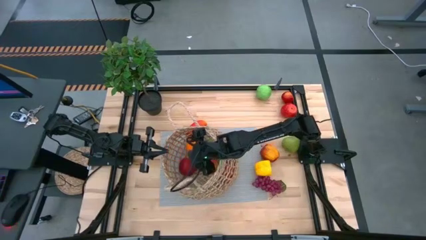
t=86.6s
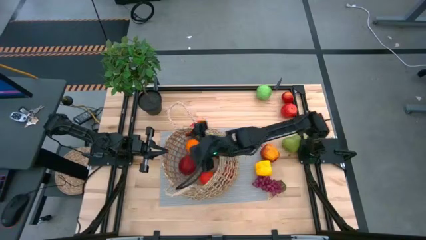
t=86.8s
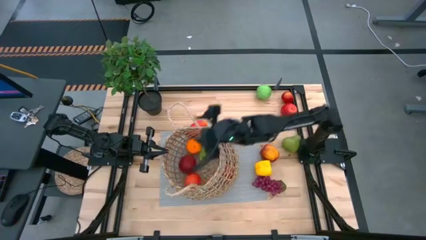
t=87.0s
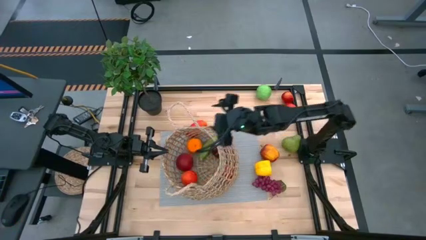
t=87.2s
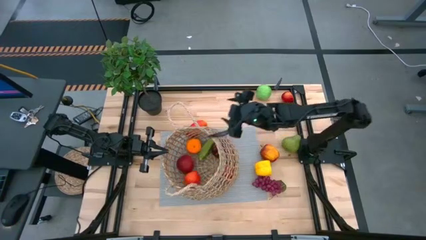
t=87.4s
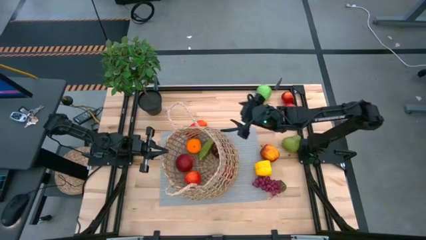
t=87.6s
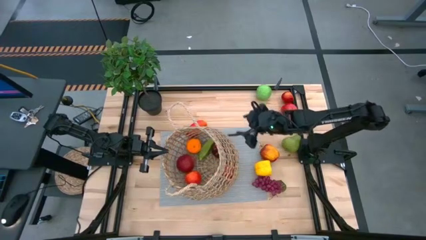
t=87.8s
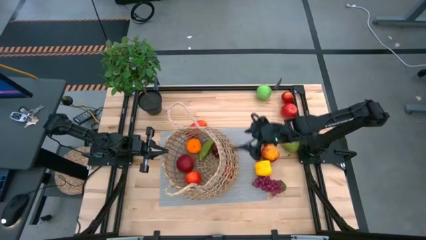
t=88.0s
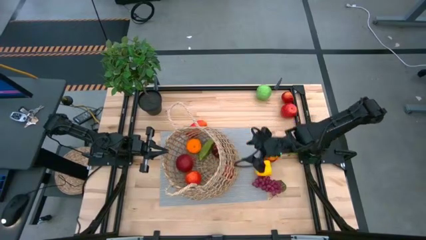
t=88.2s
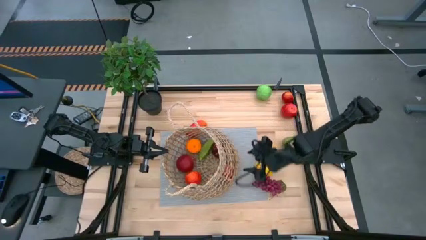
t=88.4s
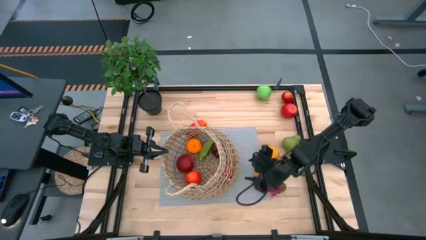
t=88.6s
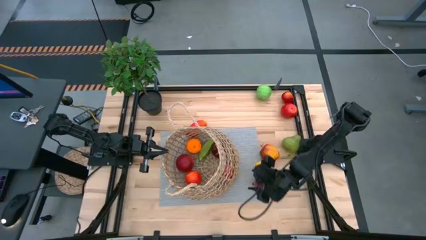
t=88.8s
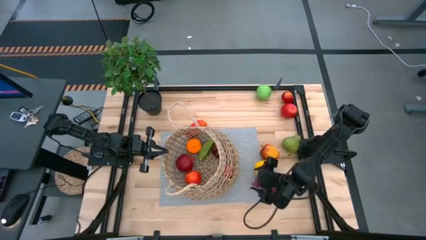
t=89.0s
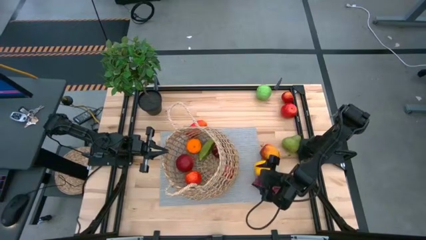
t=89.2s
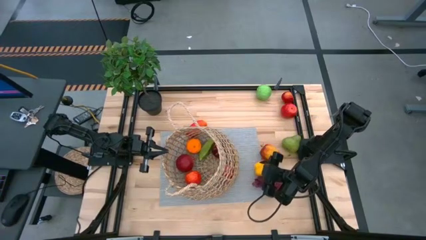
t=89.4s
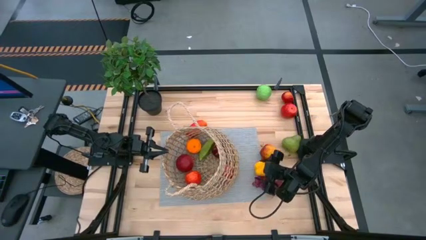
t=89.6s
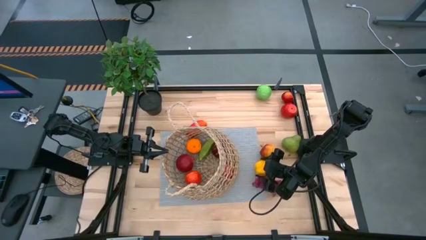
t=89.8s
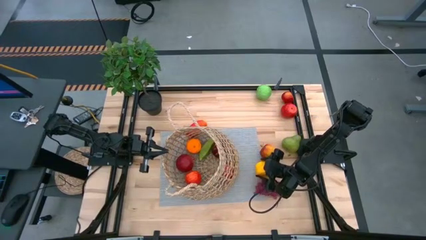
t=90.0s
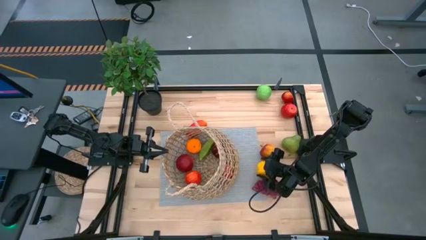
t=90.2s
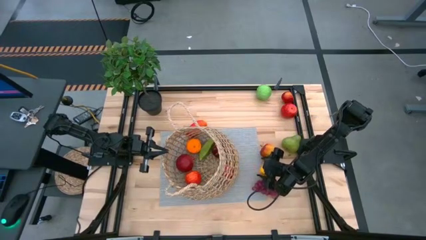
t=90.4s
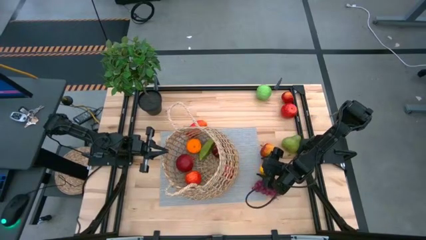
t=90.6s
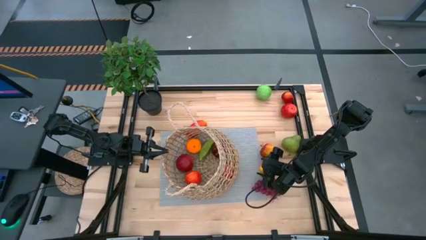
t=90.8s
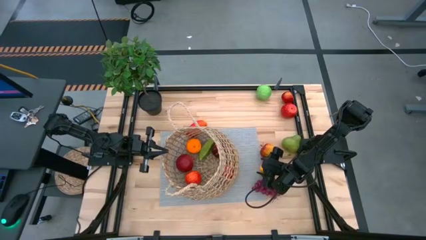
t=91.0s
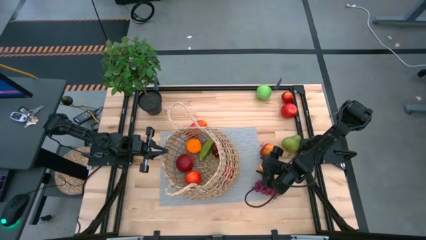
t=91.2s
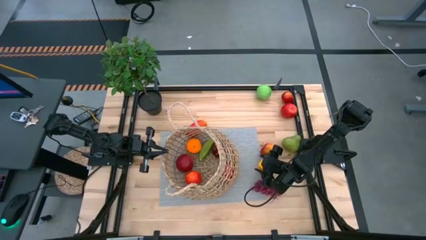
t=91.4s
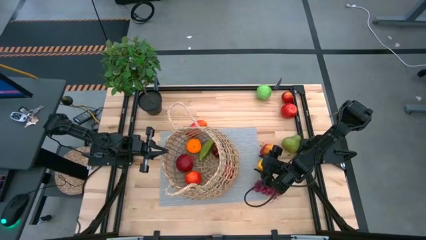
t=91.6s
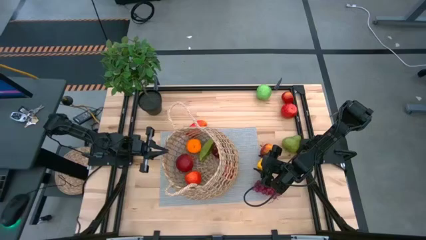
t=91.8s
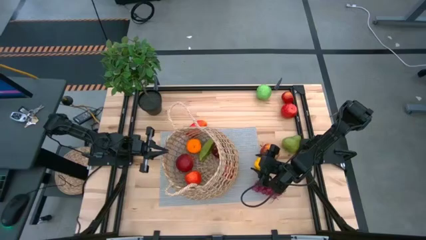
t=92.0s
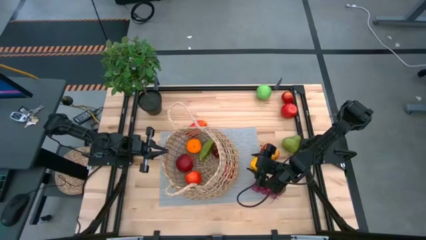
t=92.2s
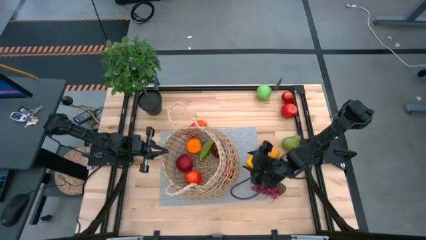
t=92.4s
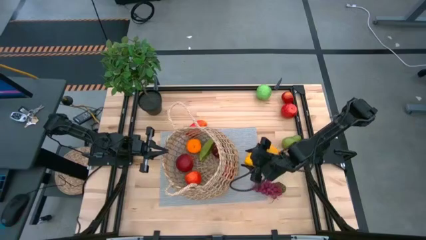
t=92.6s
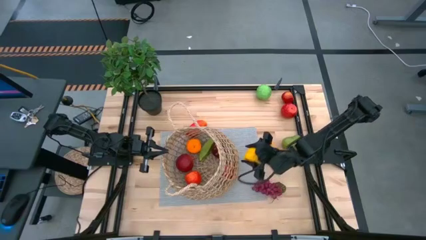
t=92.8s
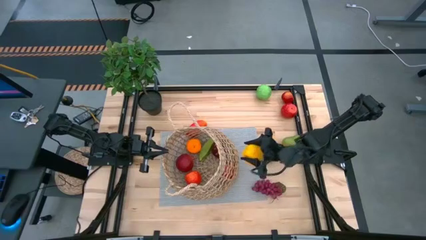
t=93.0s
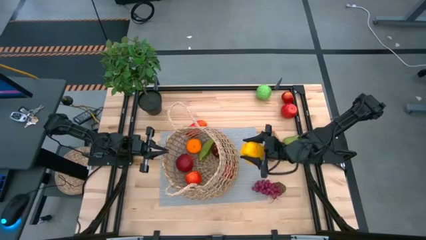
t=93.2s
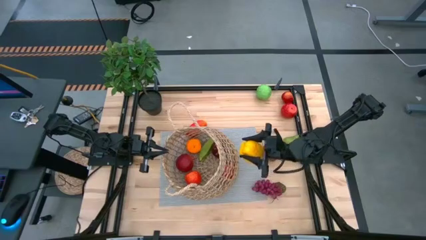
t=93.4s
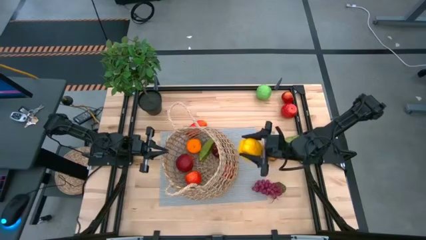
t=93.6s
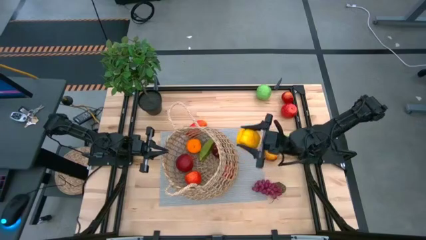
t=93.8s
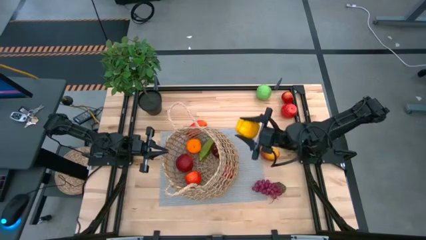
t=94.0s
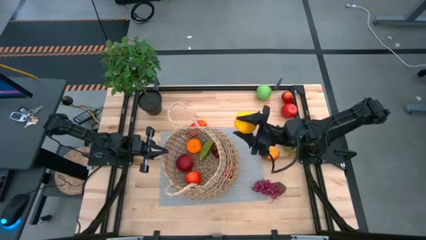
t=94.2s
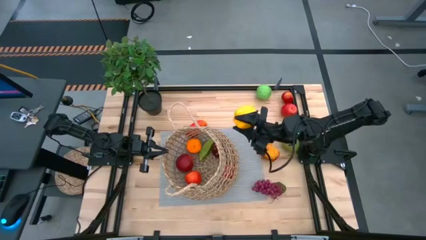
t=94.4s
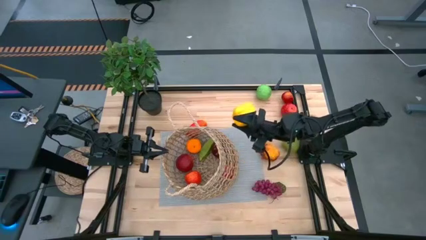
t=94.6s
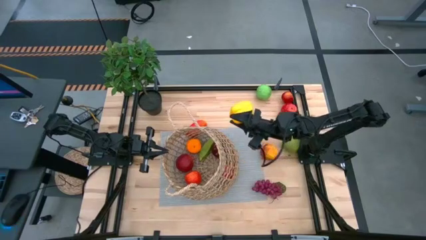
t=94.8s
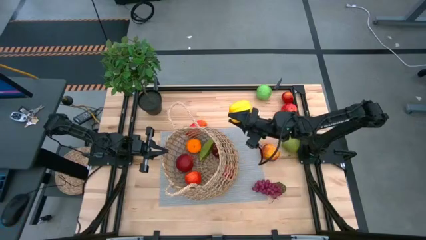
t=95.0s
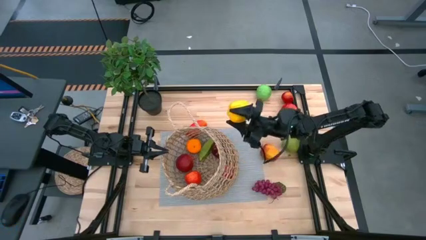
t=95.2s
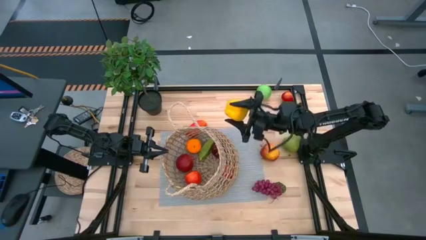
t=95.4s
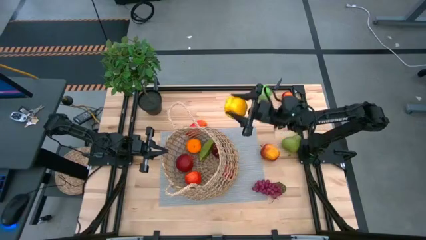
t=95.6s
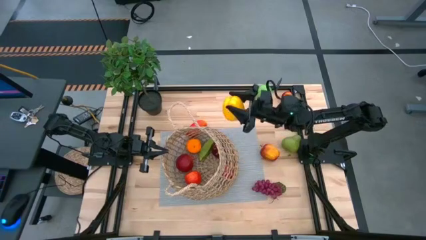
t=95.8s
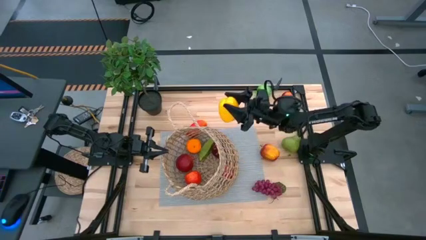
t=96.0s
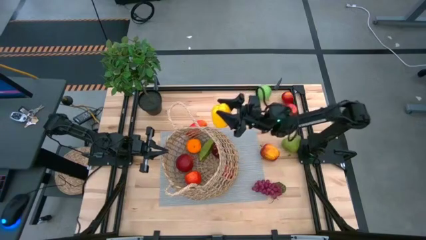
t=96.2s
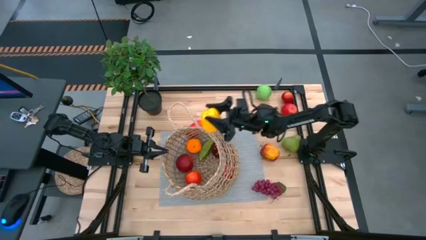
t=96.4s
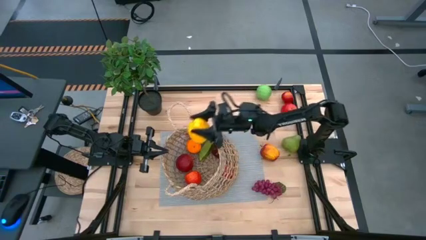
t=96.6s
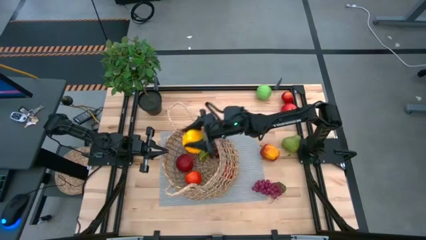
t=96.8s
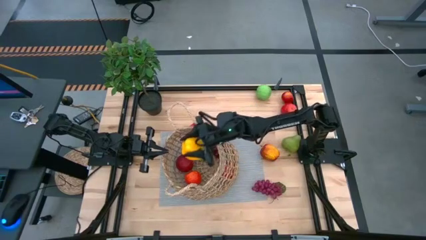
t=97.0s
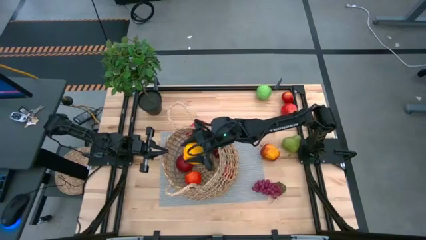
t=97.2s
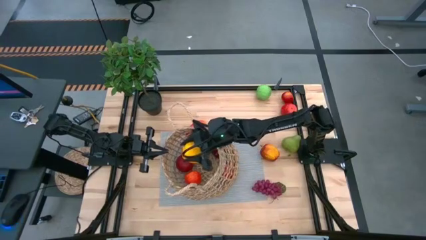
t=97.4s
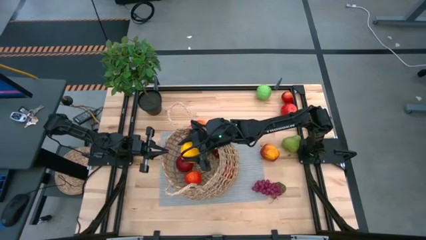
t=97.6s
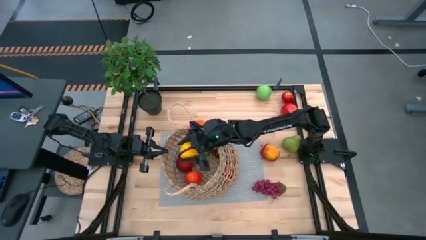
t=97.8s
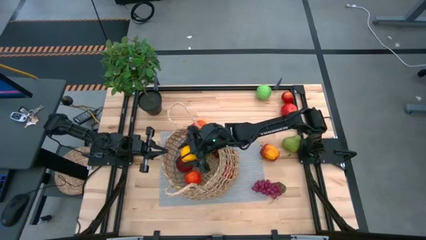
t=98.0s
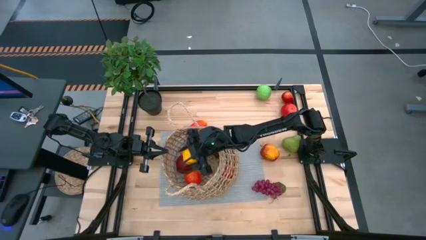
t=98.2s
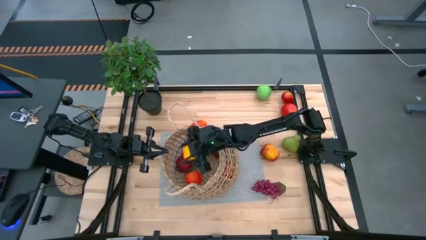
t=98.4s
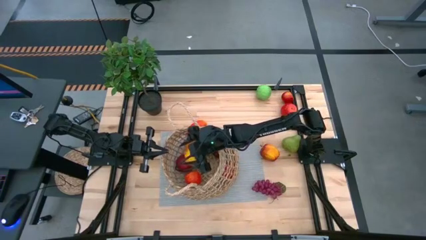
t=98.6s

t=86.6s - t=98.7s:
Task: Build produce basket
Put the yellow bell pepper into the brown woven basket
